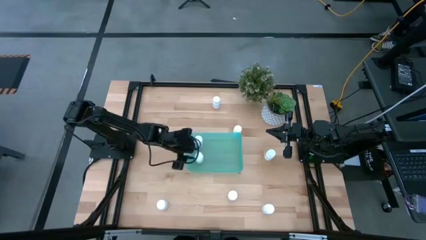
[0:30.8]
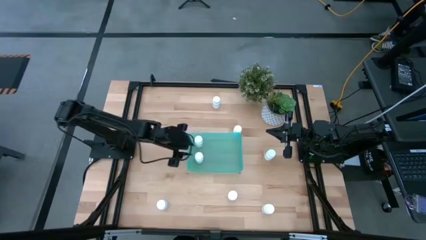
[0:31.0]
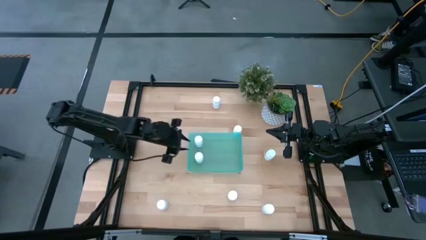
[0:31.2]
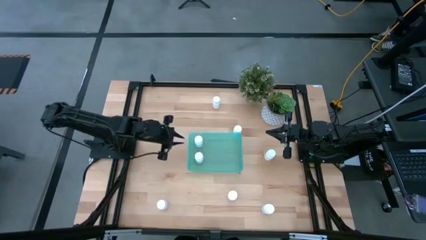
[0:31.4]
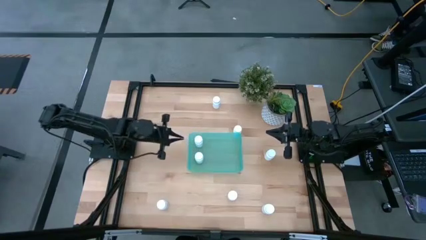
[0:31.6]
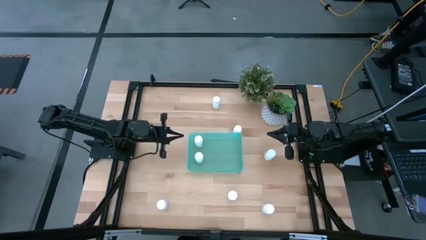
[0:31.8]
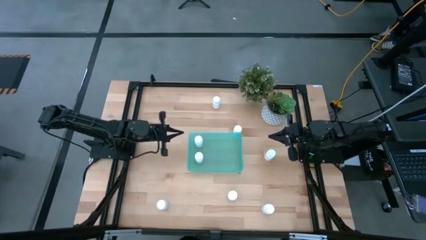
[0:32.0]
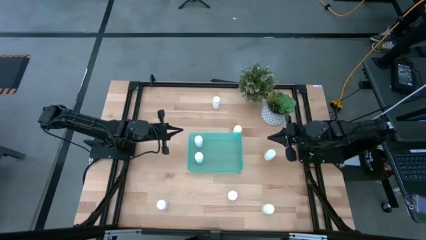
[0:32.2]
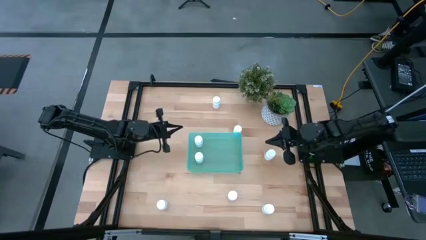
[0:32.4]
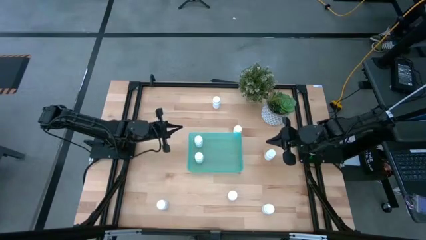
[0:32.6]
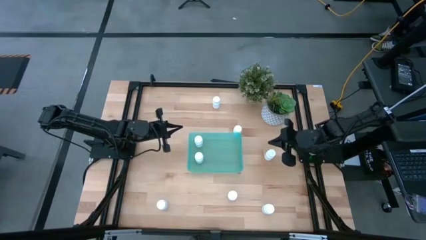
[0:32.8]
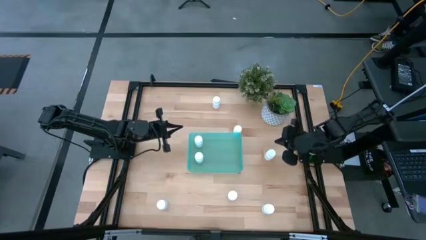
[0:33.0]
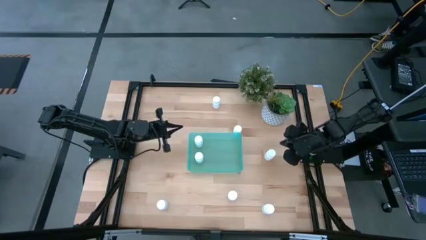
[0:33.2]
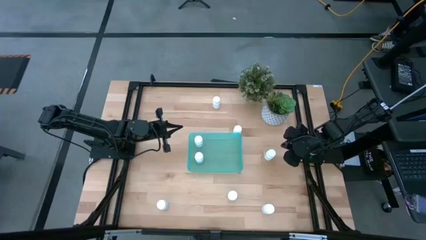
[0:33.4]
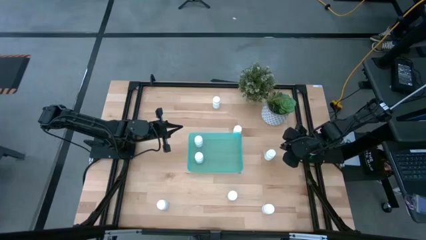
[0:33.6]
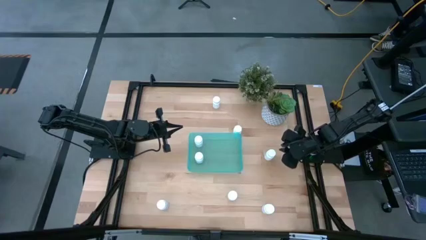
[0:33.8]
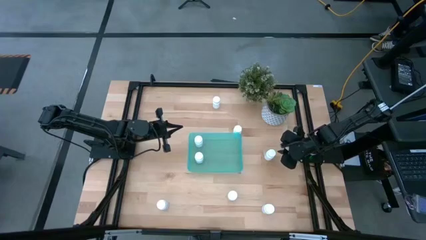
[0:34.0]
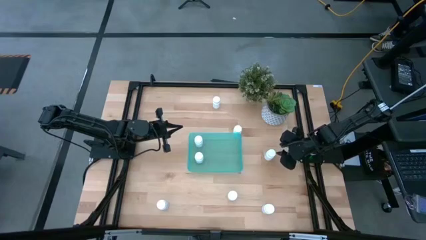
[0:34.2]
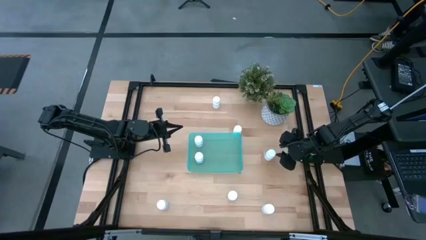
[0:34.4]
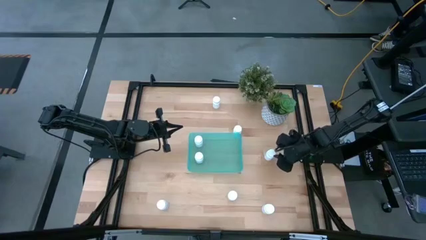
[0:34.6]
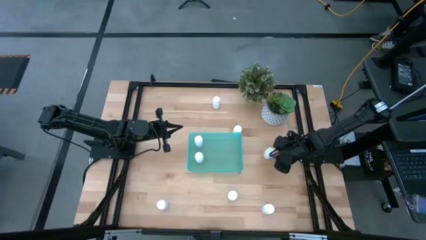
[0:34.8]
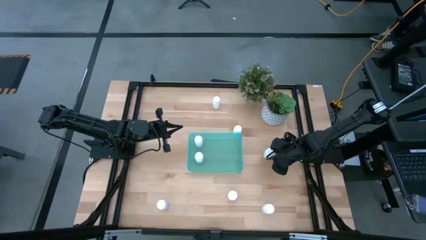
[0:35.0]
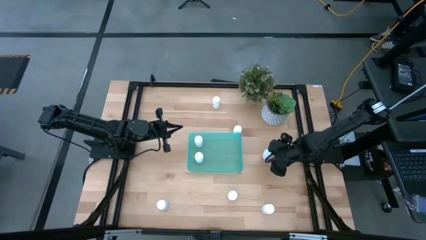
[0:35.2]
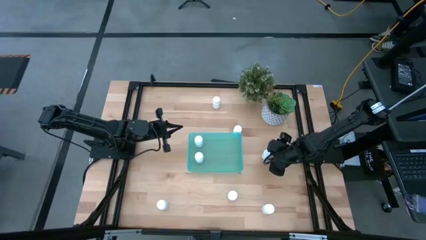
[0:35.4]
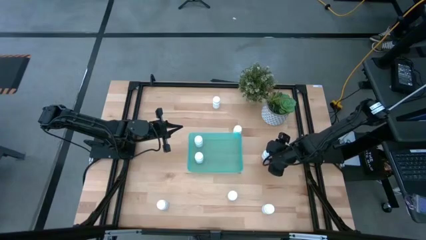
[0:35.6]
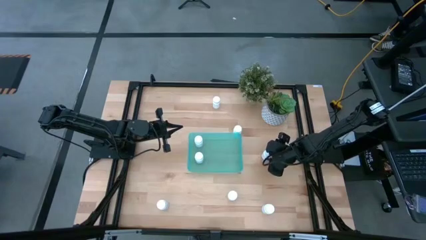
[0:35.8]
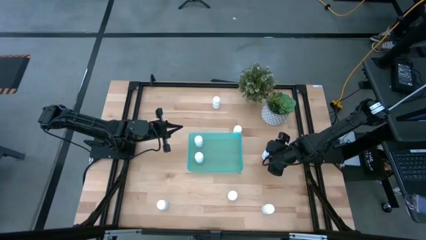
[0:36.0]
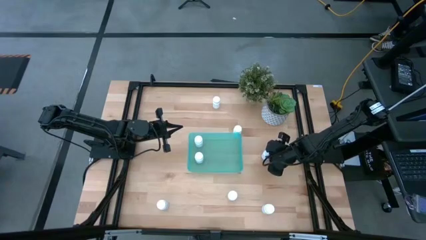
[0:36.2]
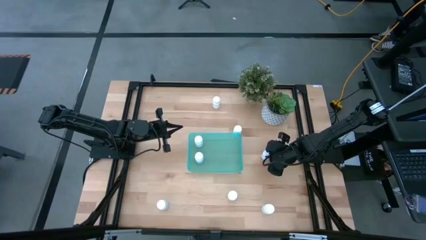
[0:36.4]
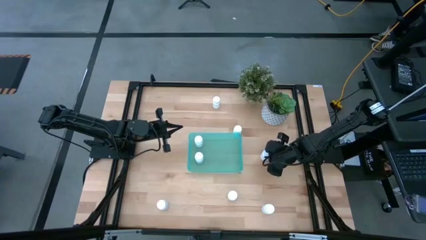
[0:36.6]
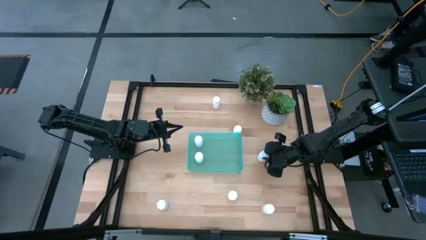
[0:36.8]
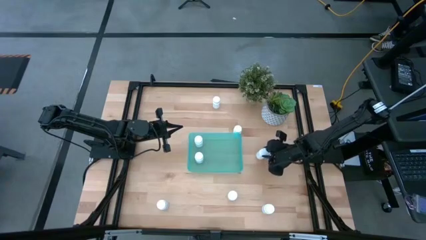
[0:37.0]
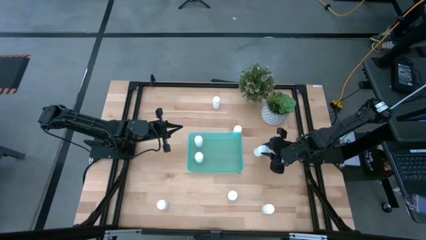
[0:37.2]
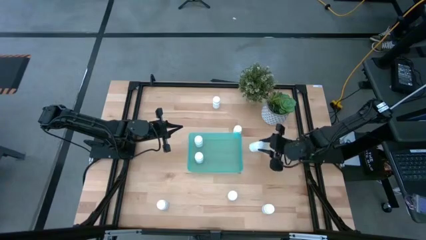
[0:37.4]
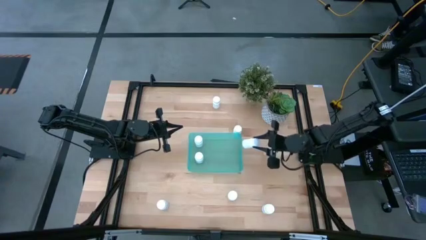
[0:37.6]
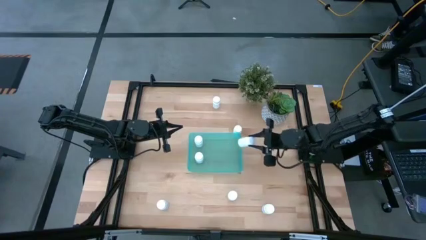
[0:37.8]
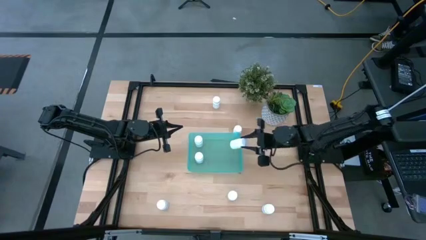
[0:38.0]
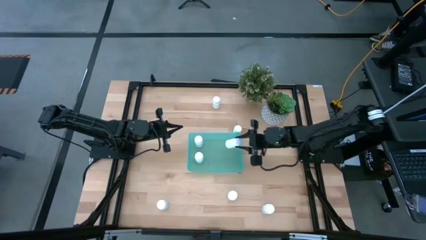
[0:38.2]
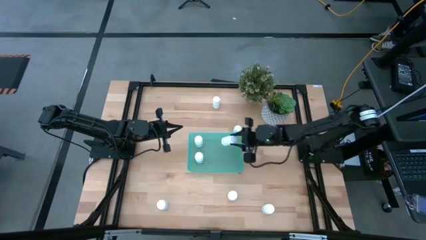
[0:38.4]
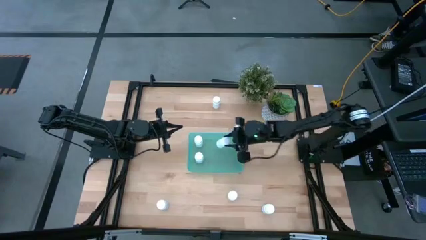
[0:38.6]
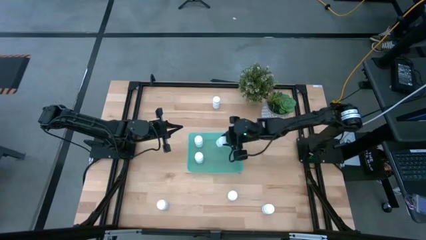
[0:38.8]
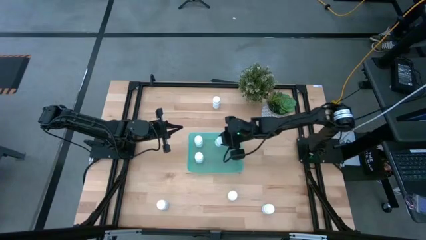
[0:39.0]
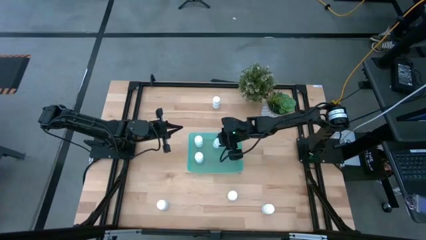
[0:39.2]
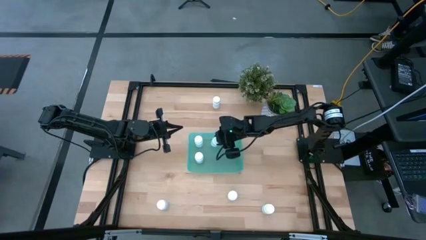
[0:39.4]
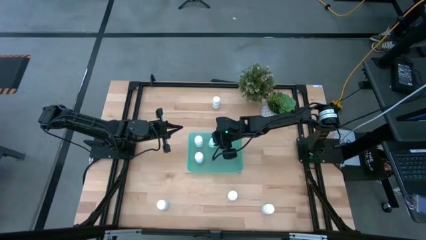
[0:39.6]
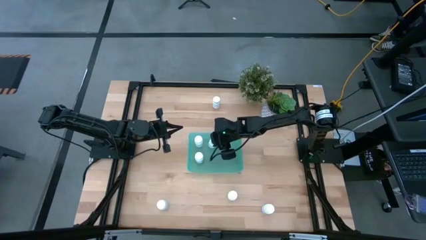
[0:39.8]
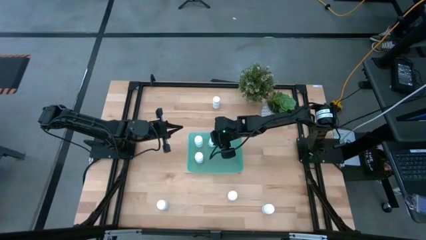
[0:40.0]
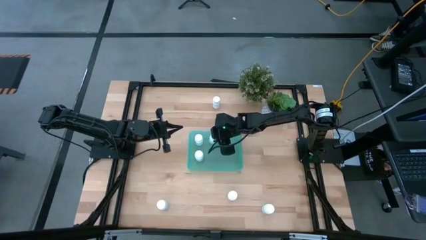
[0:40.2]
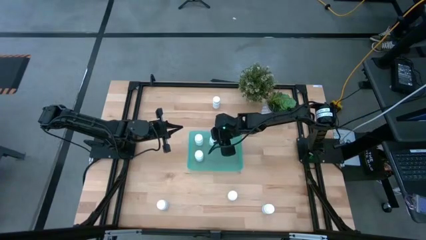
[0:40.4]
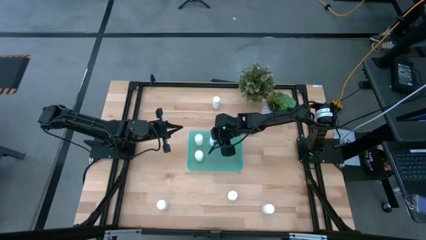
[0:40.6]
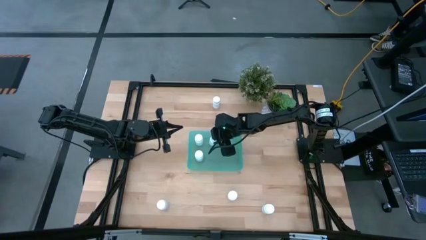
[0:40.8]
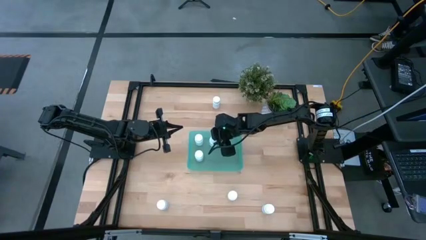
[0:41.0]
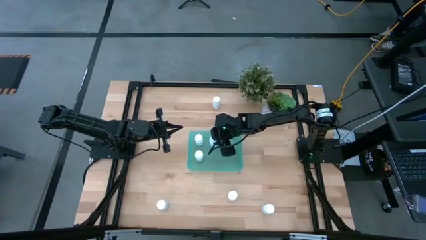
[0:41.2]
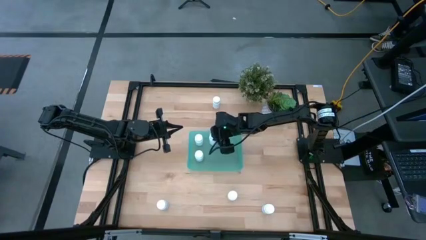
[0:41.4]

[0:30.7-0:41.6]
Task: Pick and place pill bottles into a basket
Put the white pill bottle into the blue bin
